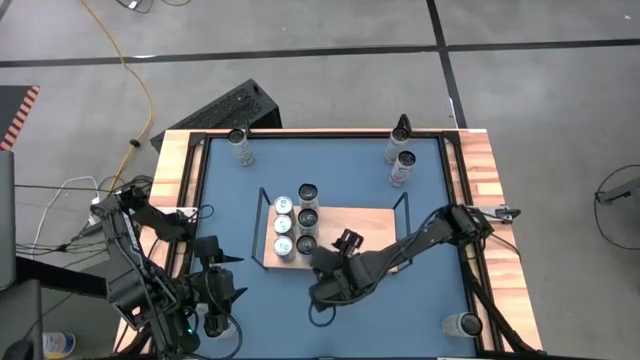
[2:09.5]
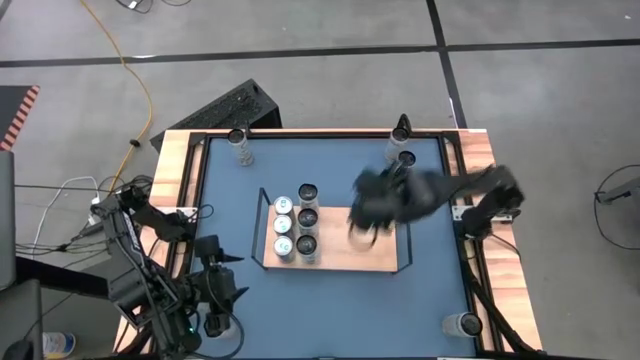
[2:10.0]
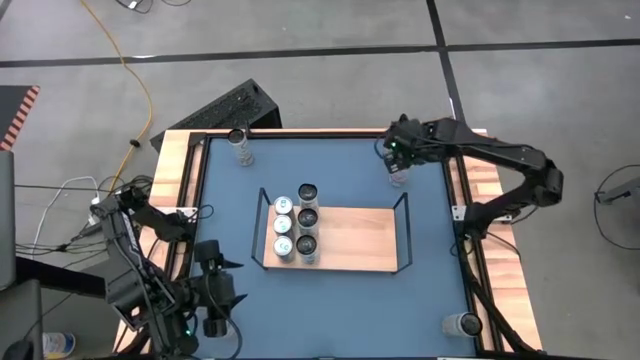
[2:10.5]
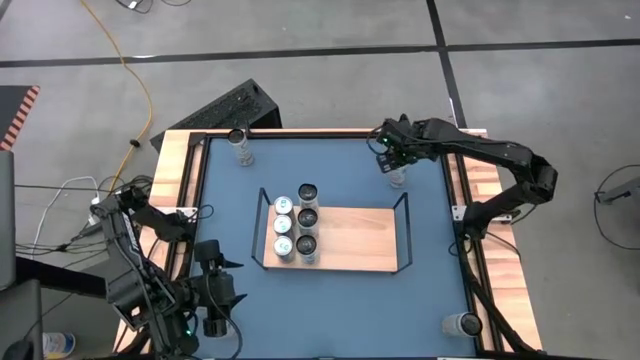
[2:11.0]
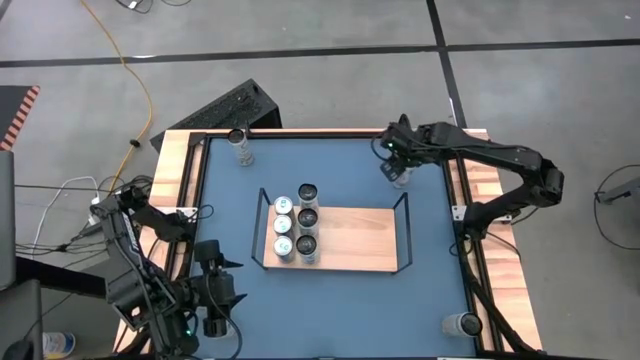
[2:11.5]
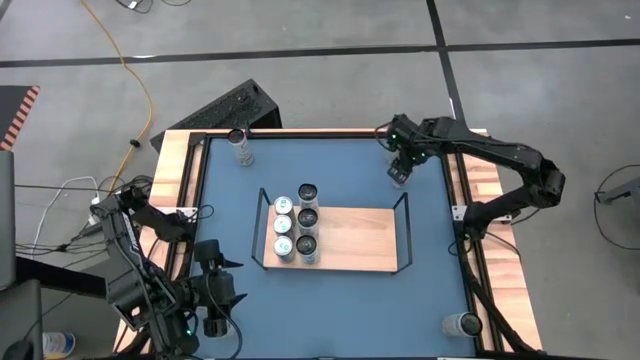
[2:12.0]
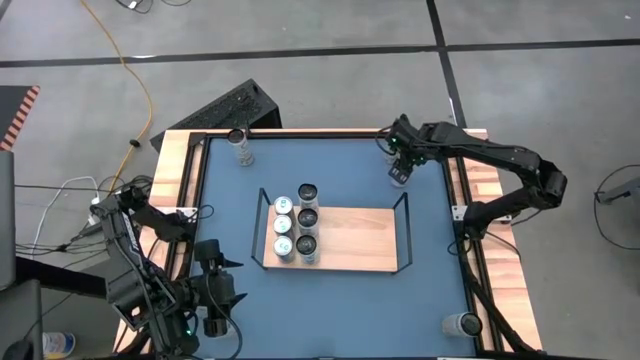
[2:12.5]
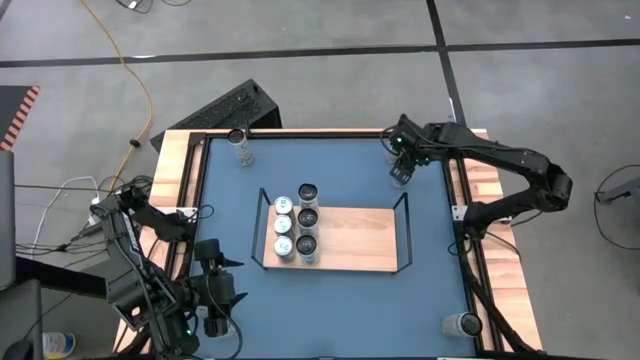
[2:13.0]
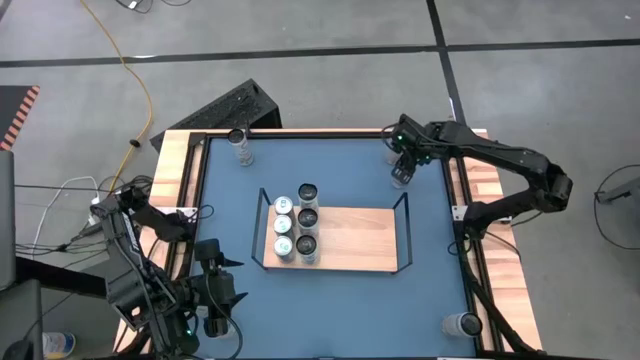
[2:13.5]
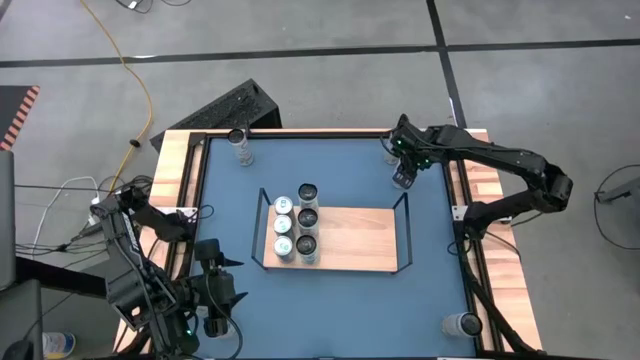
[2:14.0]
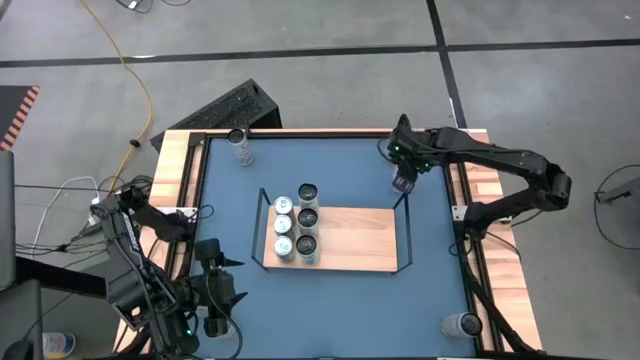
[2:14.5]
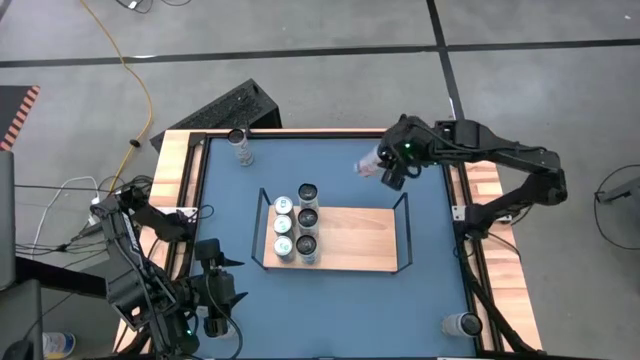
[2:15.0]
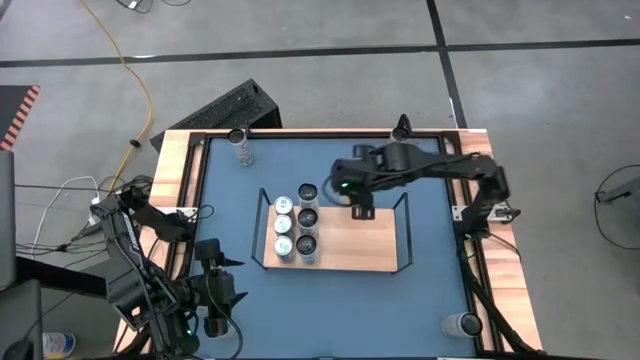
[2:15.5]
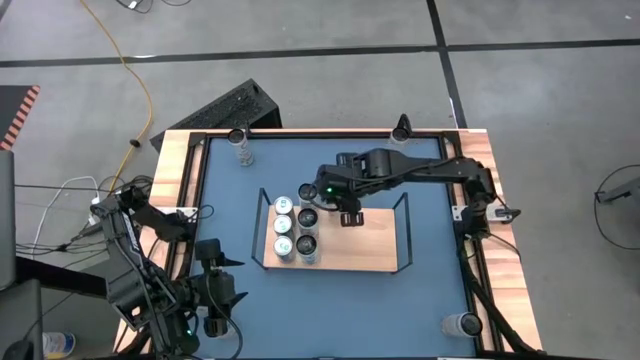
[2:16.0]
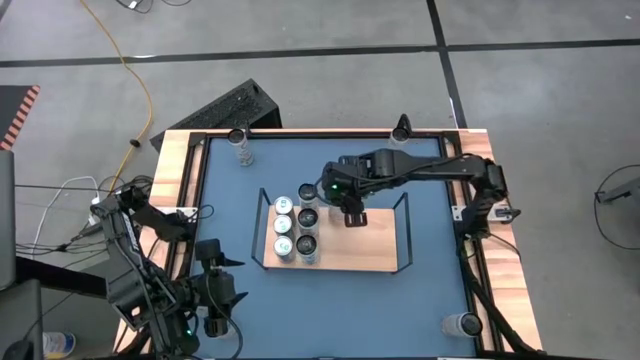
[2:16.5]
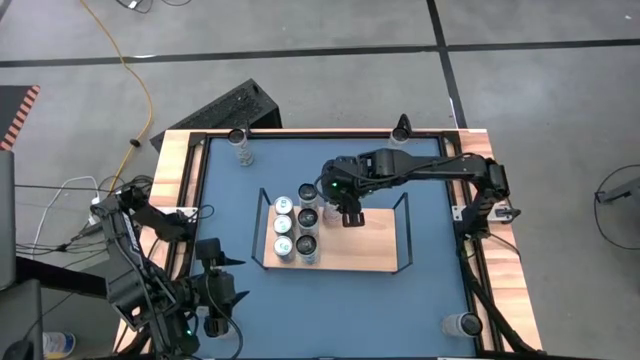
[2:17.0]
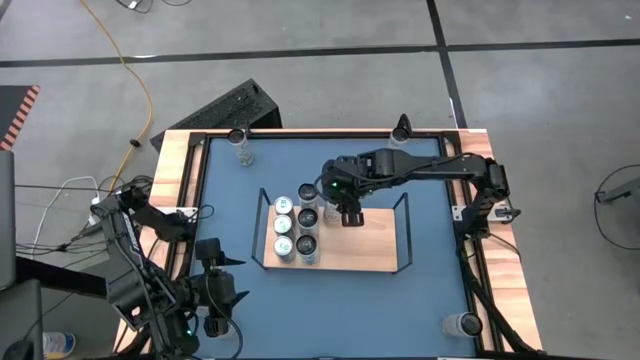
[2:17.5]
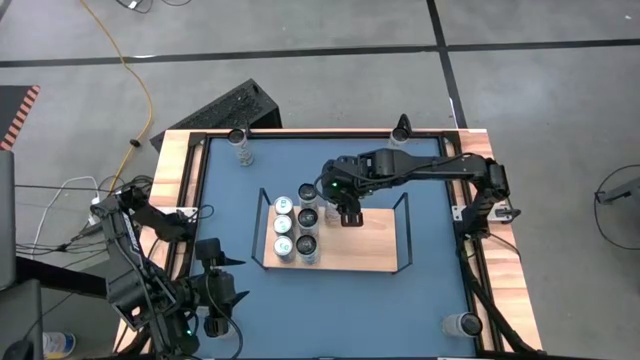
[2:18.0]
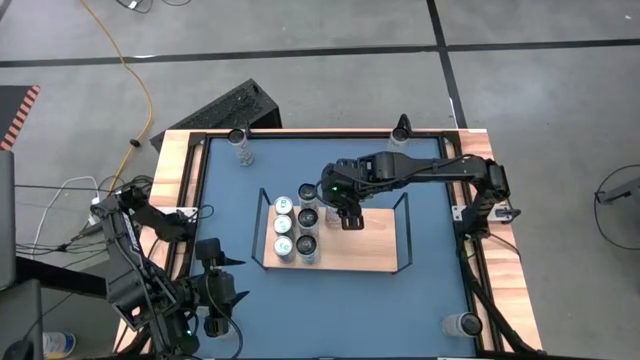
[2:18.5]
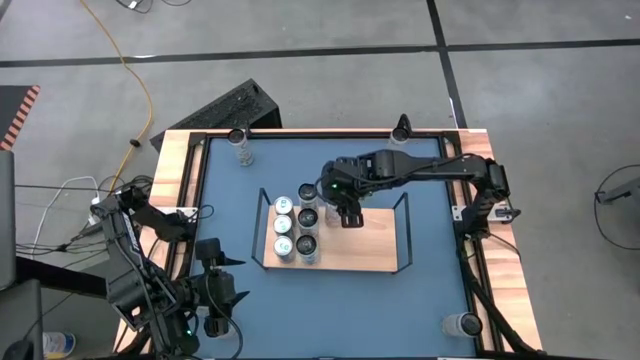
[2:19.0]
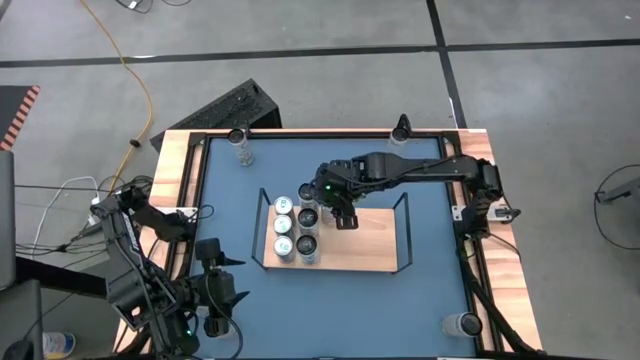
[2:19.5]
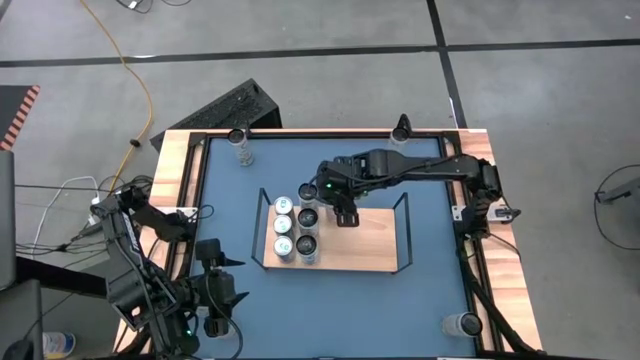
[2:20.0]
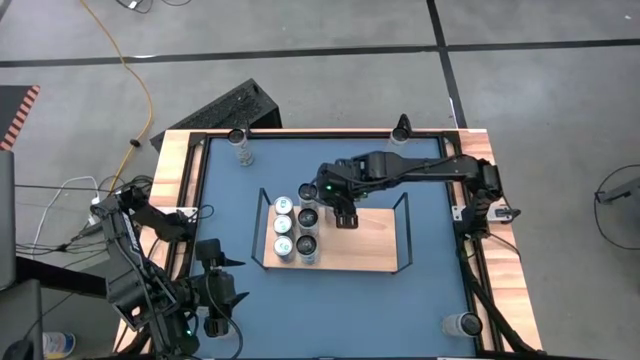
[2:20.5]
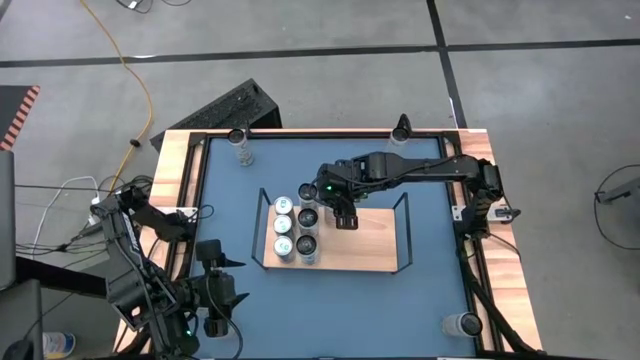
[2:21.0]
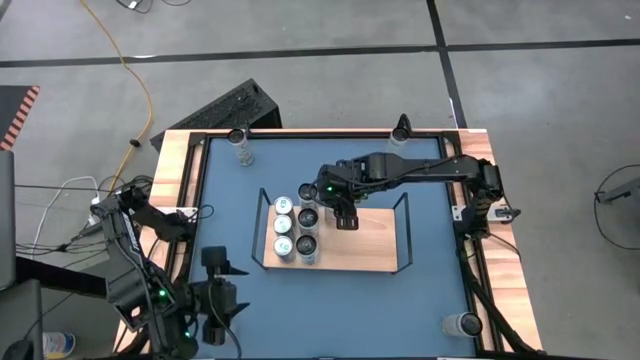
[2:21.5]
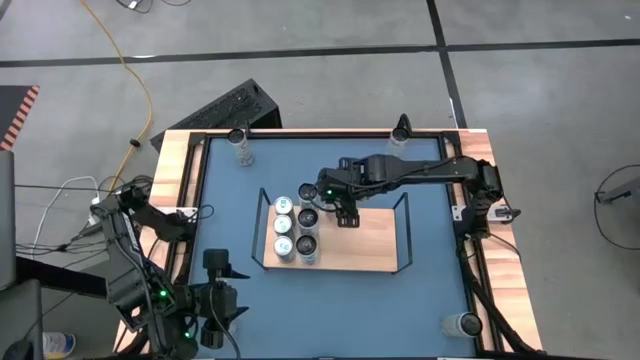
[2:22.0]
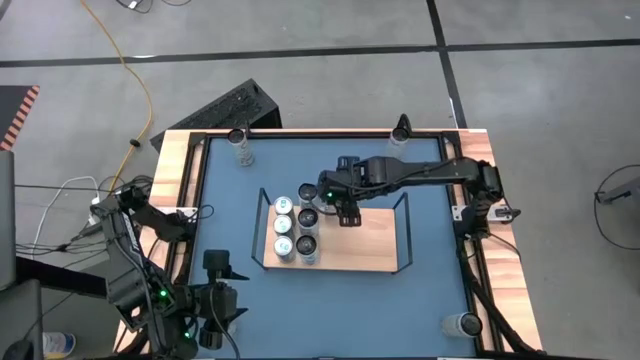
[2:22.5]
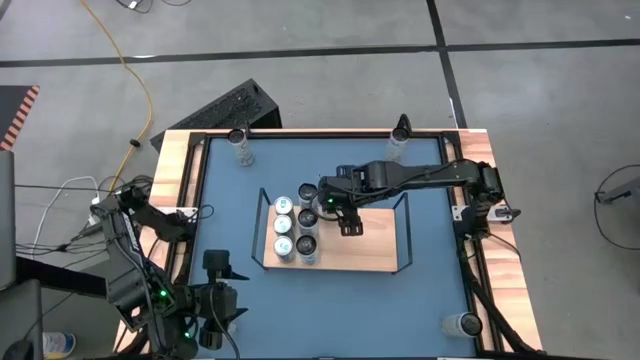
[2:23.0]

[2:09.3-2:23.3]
Task: Place canned beverage on shelf
Put the top pink soda can on the shelf

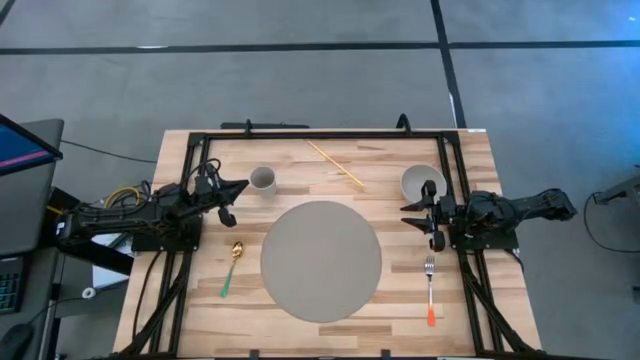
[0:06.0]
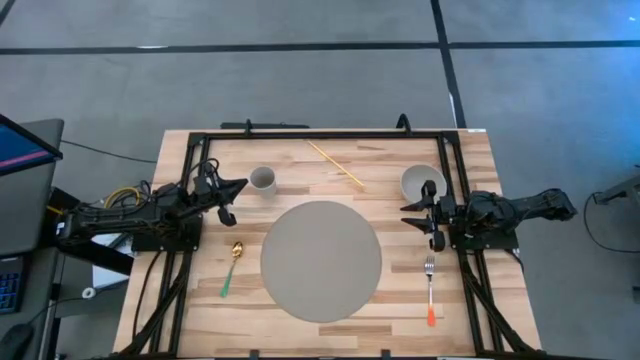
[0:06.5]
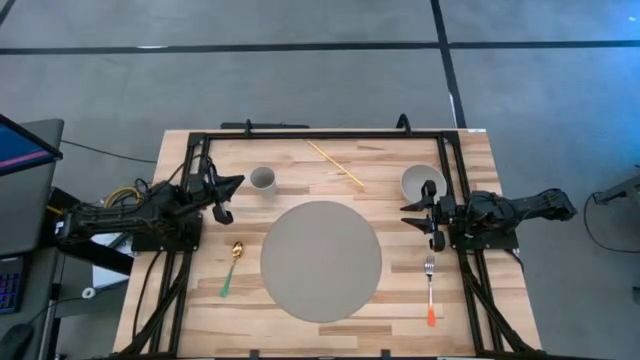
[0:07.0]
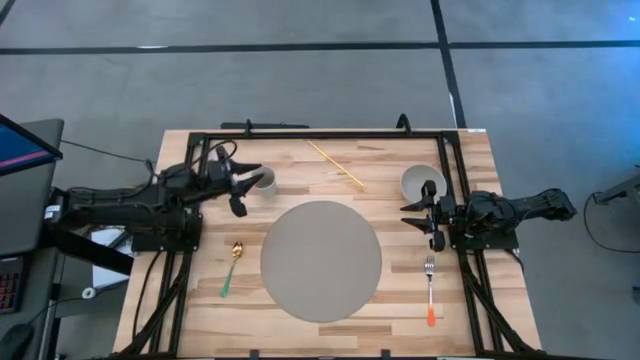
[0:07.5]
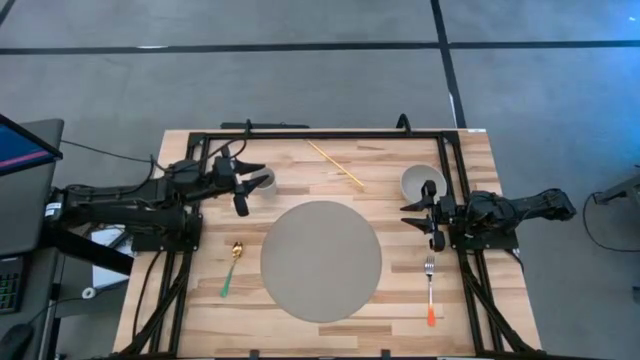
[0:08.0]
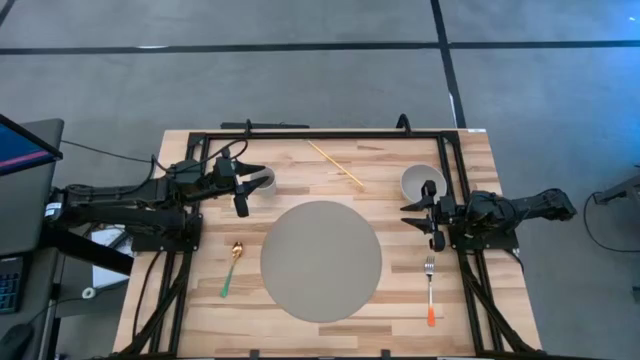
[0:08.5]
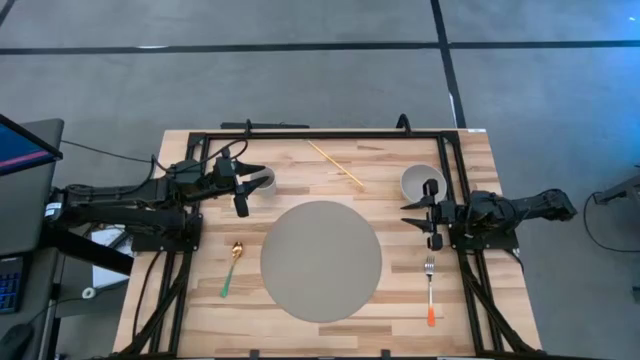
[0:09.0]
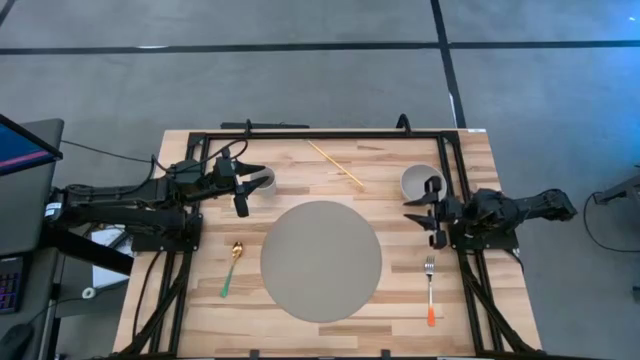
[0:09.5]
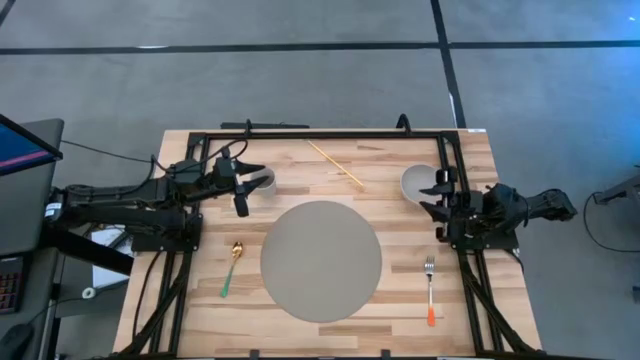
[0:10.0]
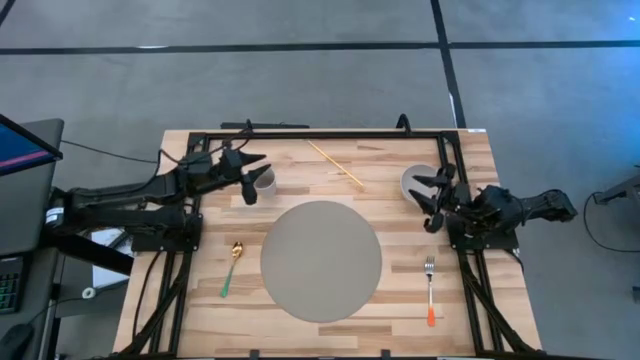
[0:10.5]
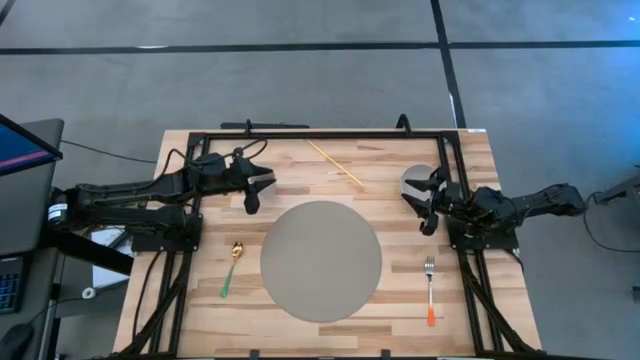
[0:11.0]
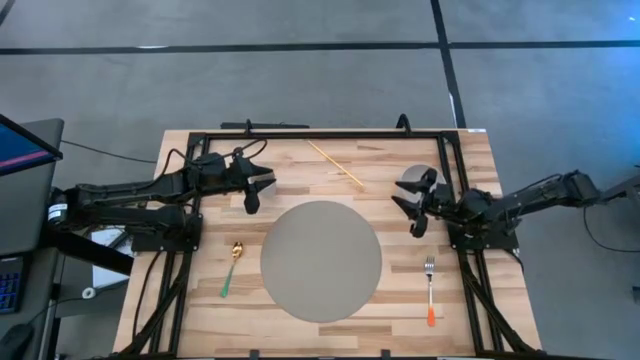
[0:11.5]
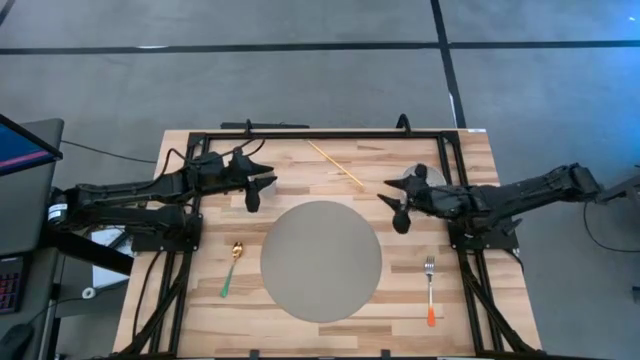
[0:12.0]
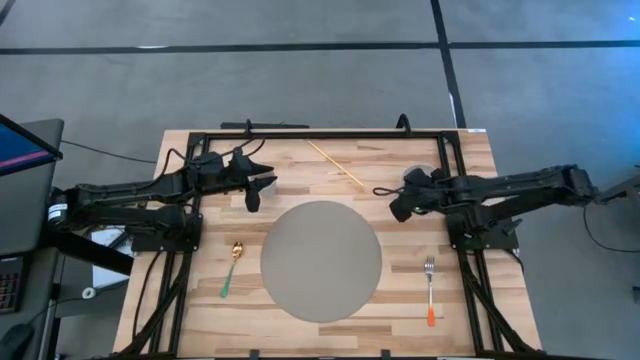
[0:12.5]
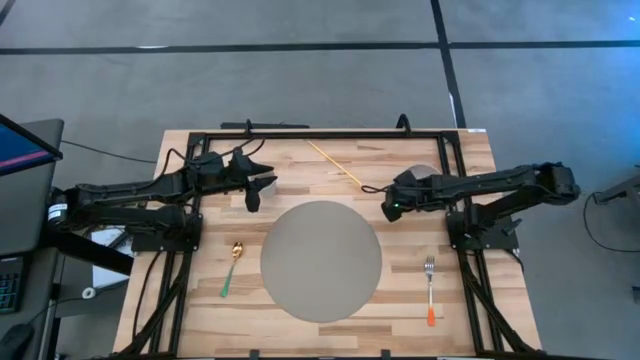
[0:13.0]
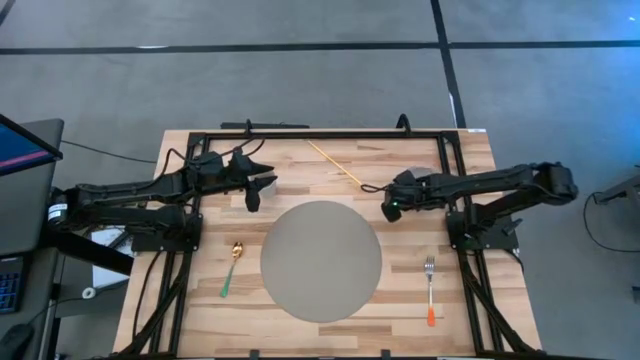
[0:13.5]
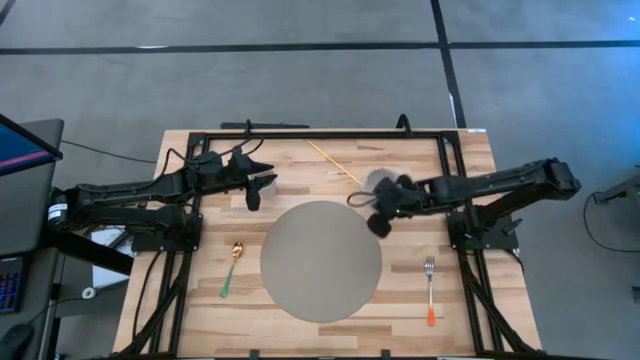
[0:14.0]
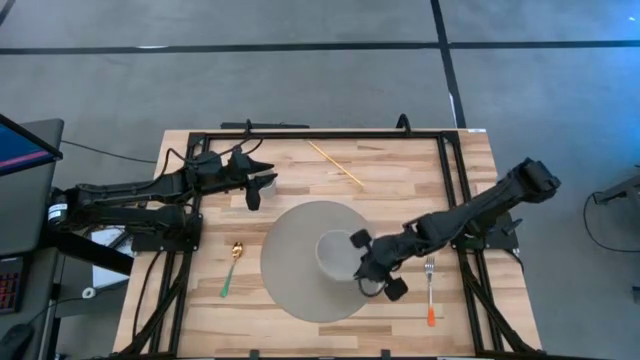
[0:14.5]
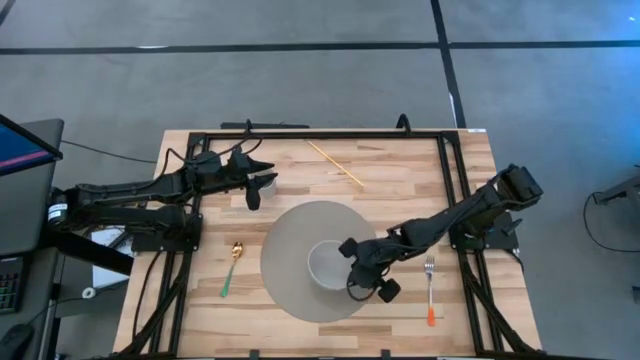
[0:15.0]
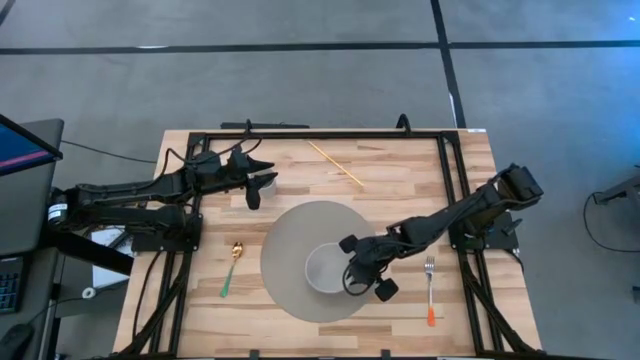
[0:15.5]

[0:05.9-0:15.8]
Task: Pick & Place Utensil
Put the gray bowl on the gray mat
